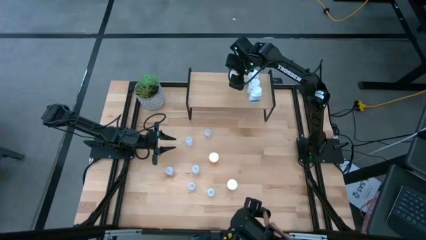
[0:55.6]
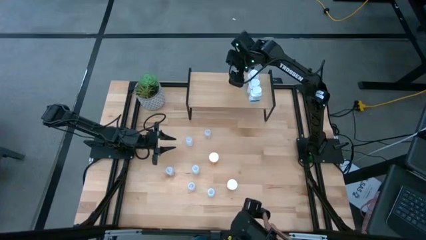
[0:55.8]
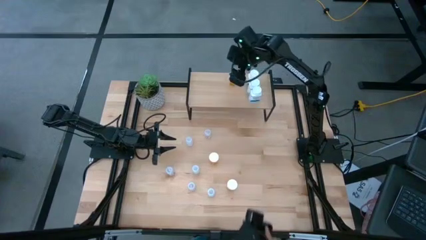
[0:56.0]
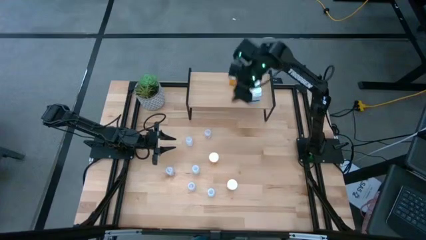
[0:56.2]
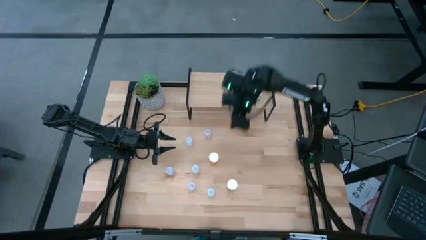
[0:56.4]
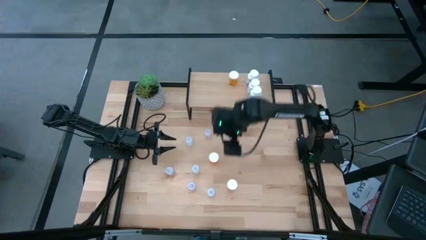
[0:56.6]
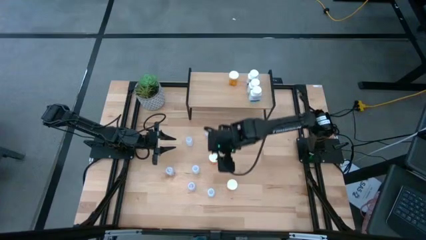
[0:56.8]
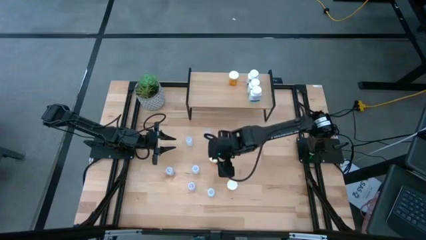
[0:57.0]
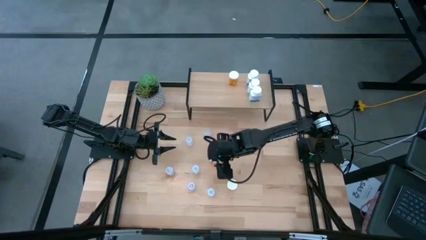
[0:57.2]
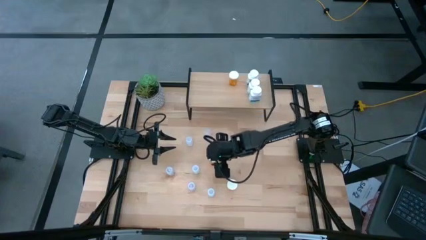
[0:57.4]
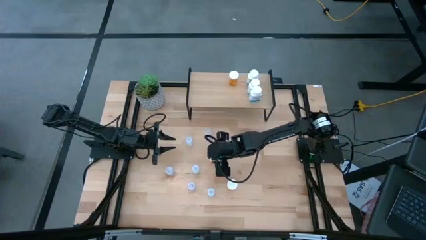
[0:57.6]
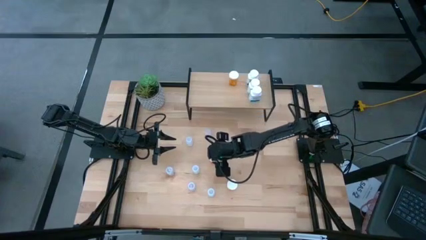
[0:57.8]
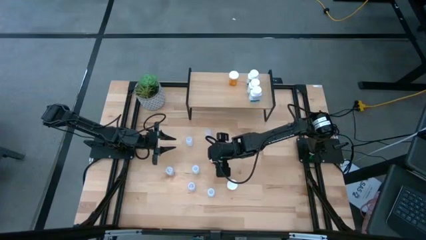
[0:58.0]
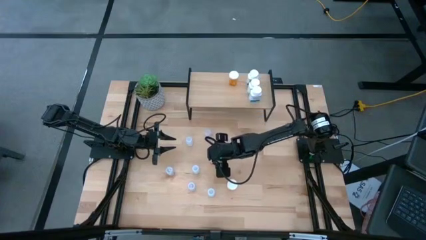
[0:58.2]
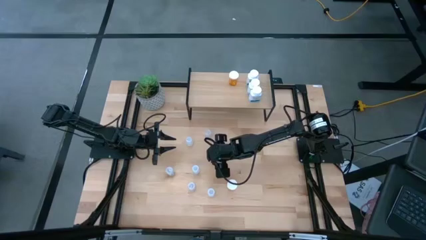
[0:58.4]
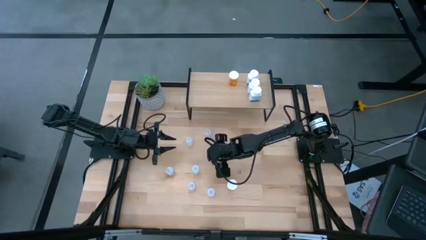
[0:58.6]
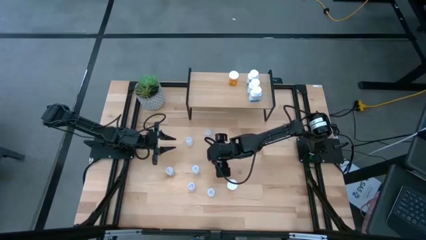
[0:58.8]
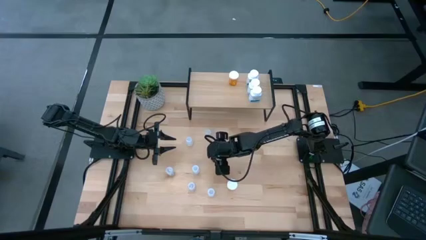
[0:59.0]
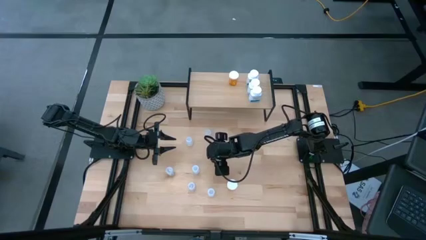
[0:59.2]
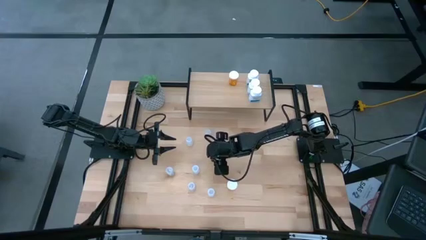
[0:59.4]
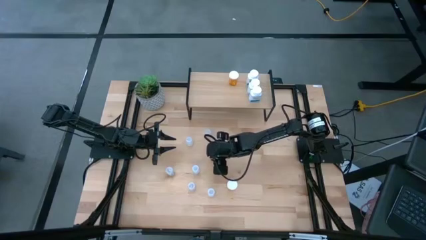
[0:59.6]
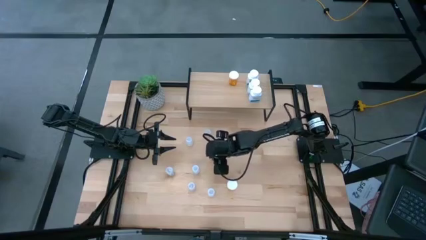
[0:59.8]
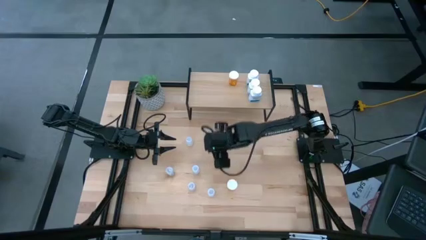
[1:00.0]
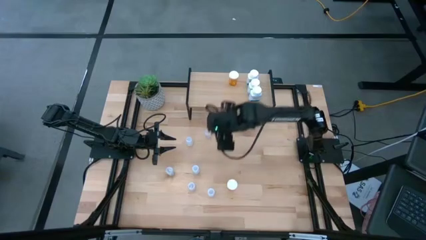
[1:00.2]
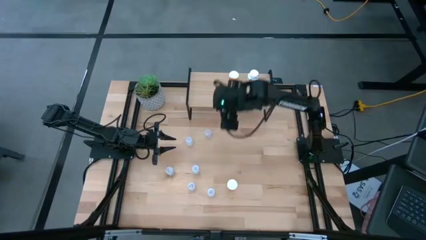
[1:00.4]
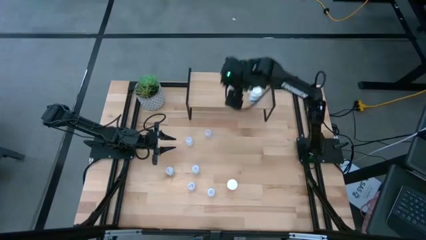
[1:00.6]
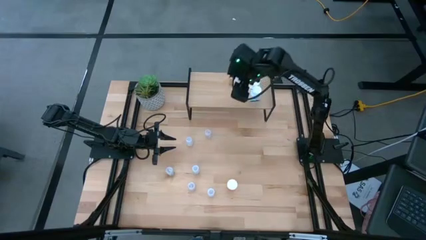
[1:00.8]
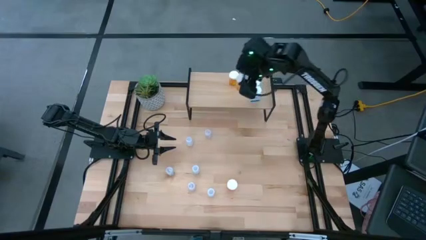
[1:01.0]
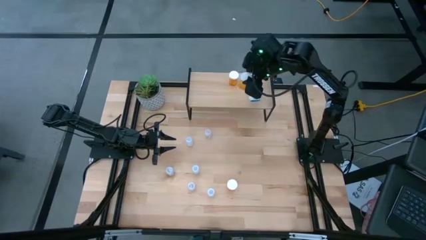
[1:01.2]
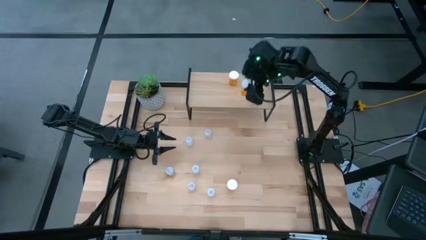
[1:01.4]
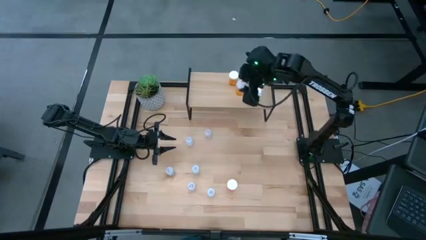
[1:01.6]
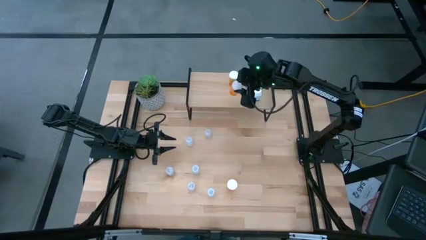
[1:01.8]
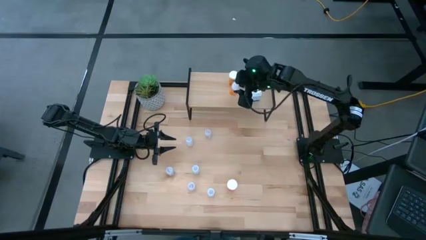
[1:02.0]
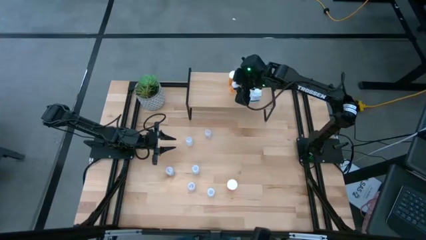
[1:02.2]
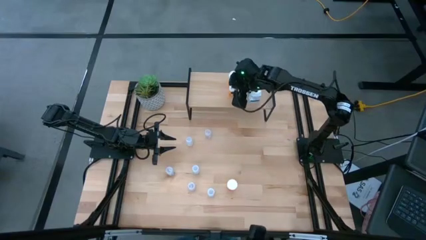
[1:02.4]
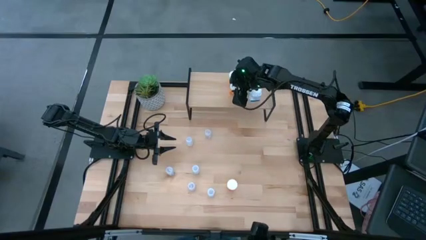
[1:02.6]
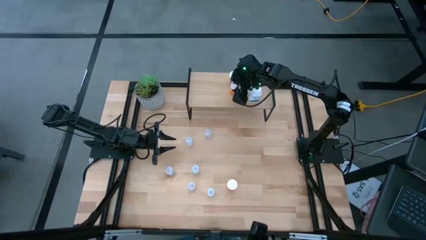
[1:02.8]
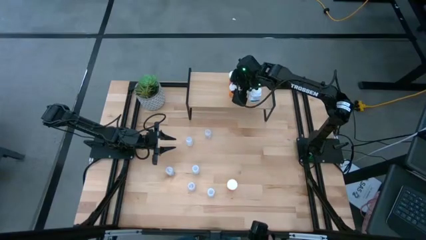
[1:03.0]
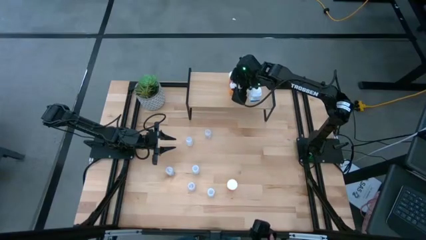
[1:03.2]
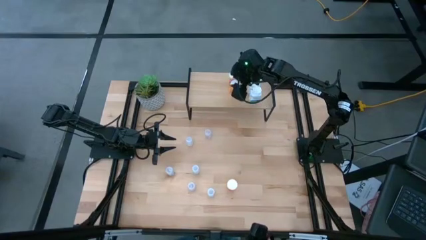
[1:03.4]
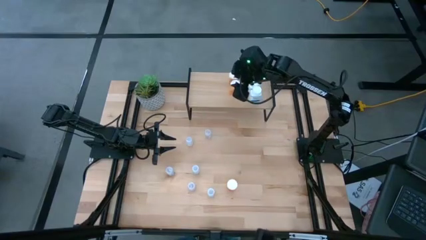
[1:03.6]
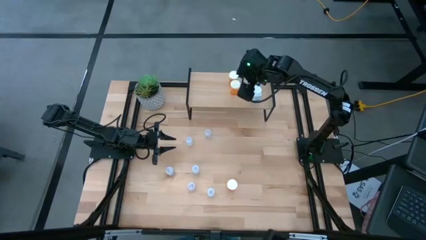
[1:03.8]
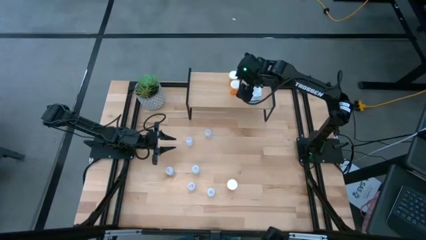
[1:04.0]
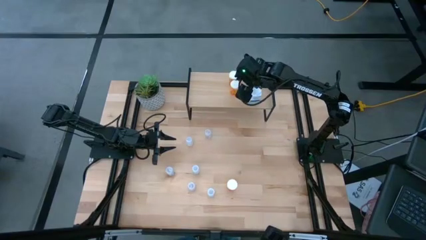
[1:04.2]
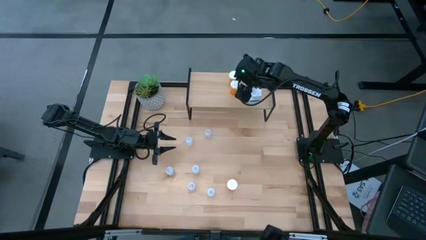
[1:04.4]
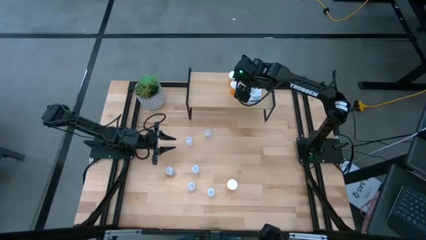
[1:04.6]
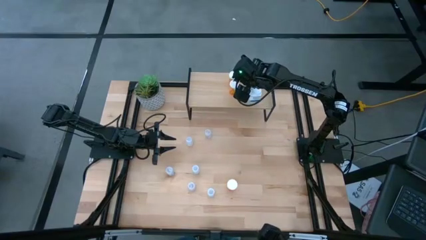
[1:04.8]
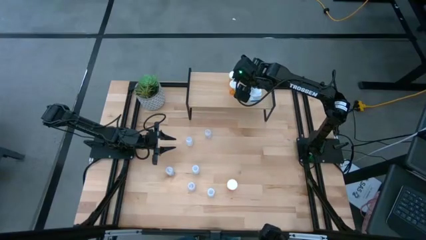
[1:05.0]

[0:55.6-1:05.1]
Task: Pick and place medicine bottles onto shelf by color
Put the top orange pill bottle on the shelf aligned with the other orange pill bottle

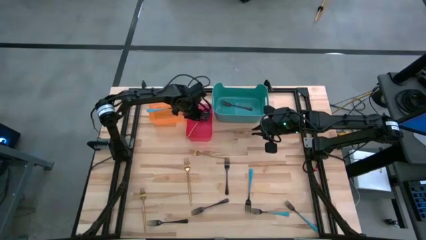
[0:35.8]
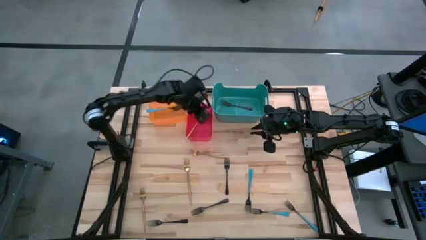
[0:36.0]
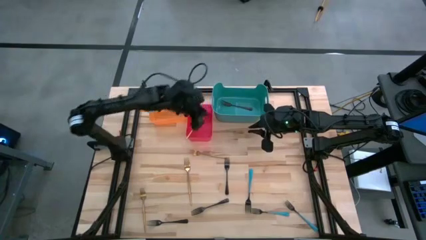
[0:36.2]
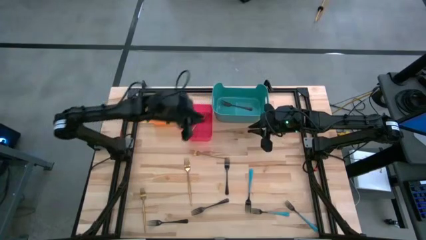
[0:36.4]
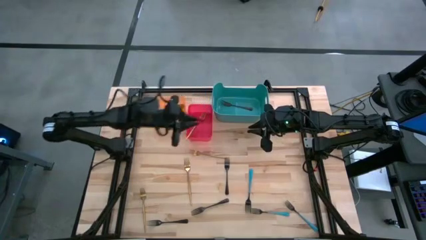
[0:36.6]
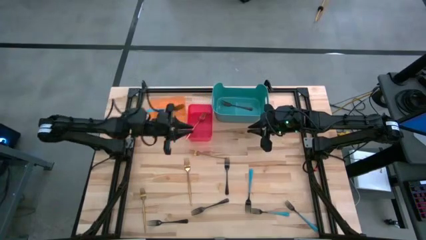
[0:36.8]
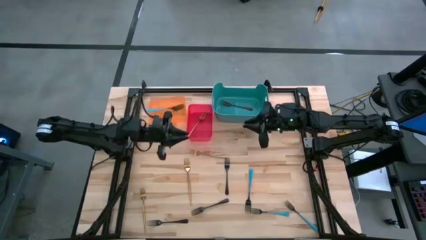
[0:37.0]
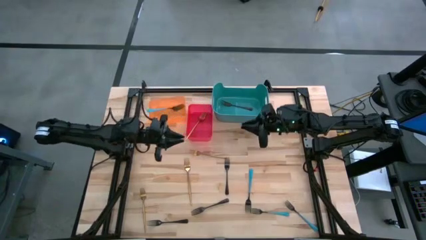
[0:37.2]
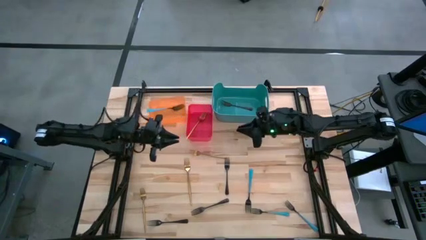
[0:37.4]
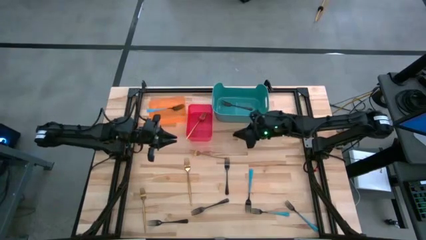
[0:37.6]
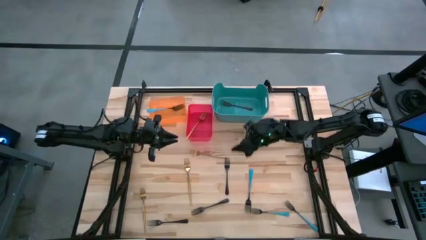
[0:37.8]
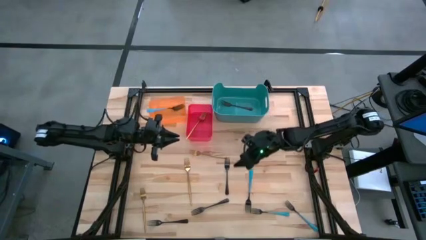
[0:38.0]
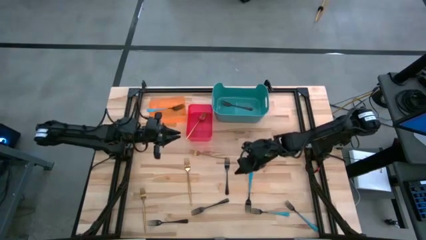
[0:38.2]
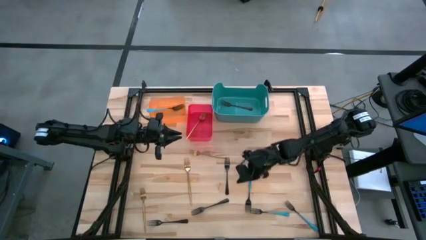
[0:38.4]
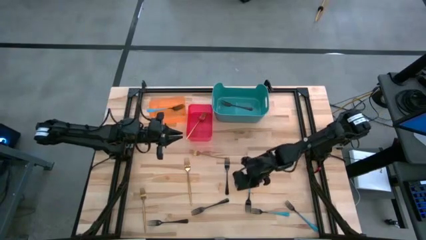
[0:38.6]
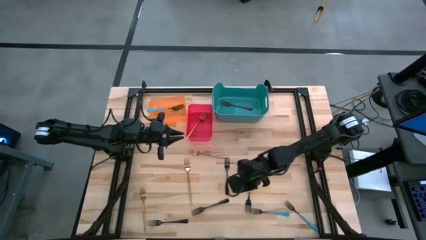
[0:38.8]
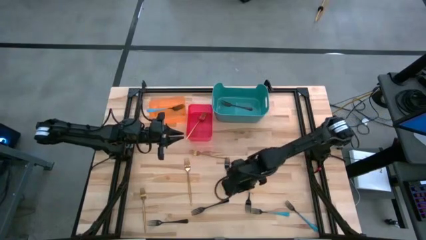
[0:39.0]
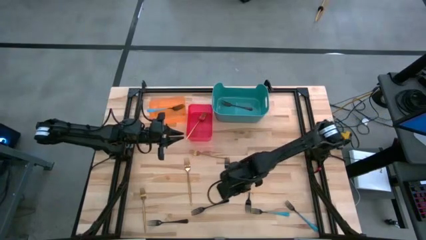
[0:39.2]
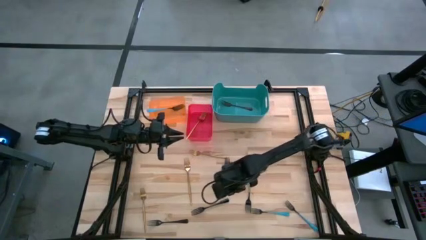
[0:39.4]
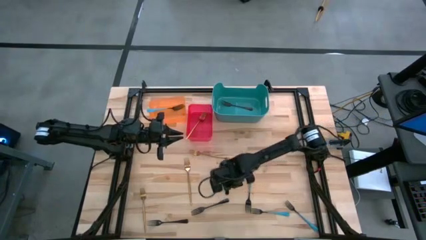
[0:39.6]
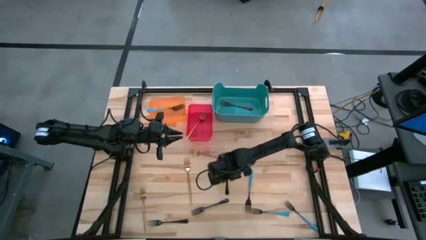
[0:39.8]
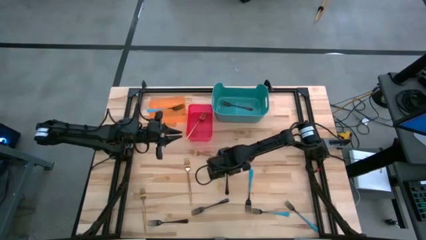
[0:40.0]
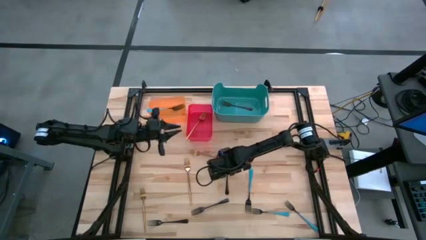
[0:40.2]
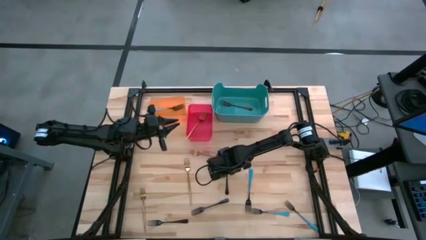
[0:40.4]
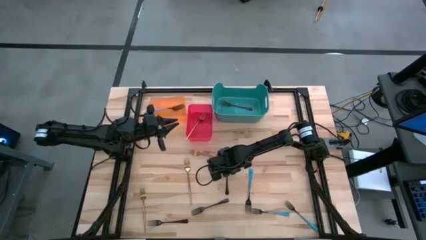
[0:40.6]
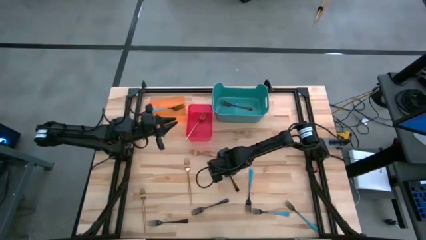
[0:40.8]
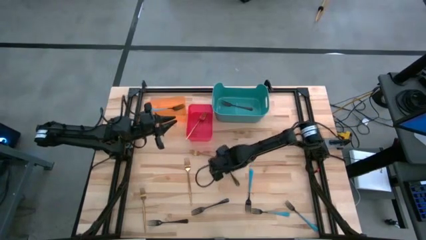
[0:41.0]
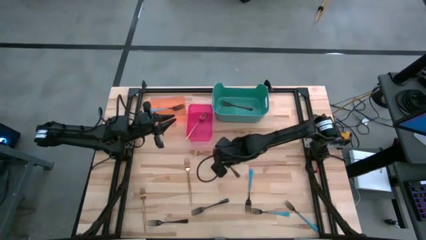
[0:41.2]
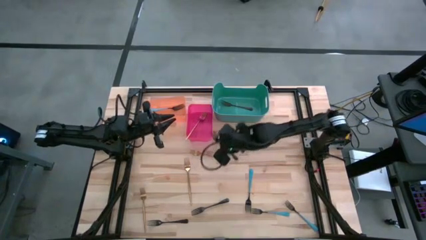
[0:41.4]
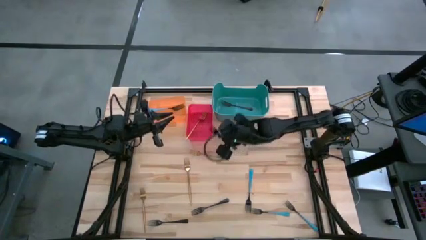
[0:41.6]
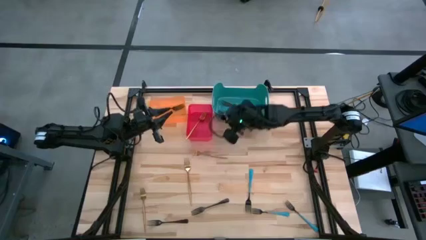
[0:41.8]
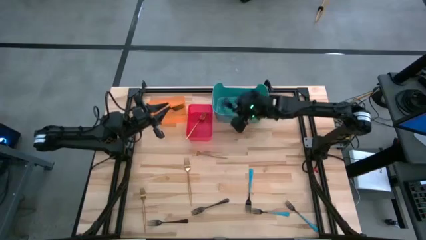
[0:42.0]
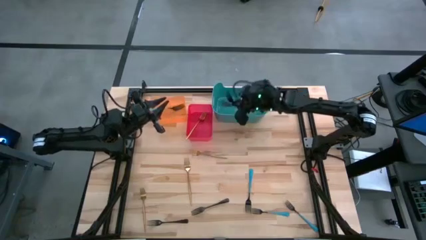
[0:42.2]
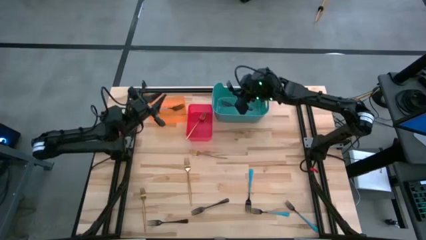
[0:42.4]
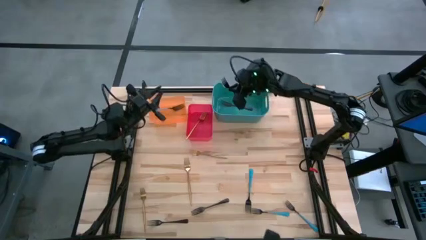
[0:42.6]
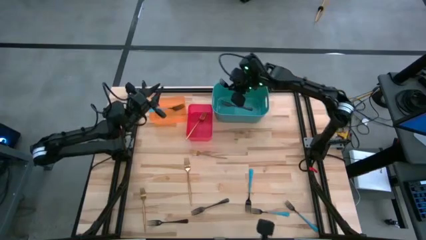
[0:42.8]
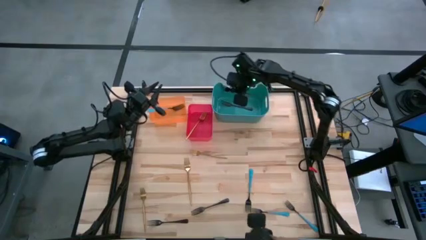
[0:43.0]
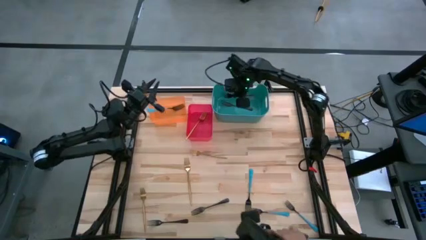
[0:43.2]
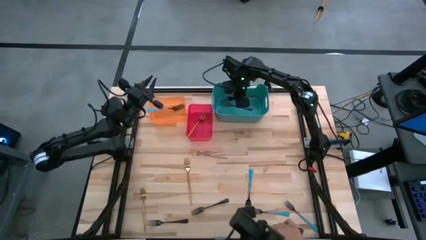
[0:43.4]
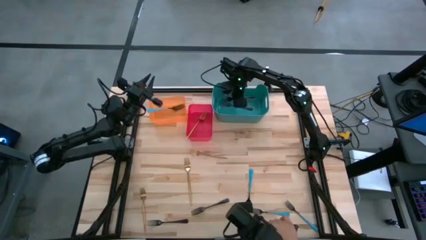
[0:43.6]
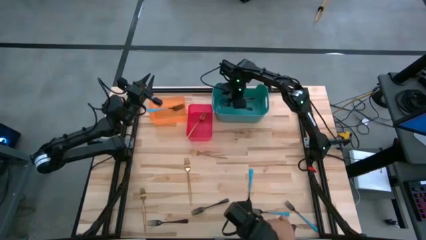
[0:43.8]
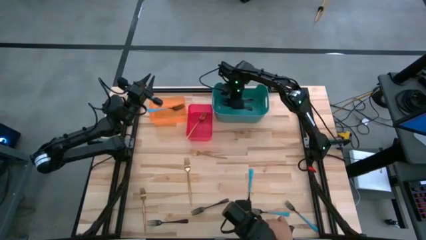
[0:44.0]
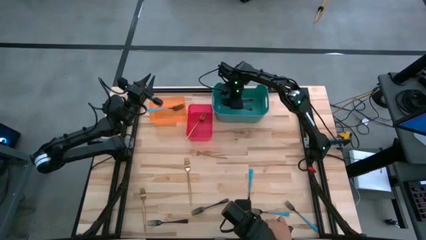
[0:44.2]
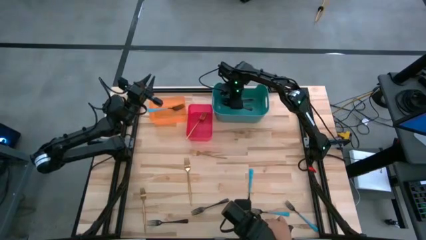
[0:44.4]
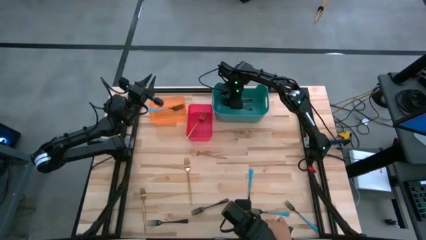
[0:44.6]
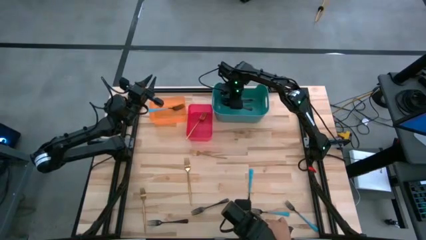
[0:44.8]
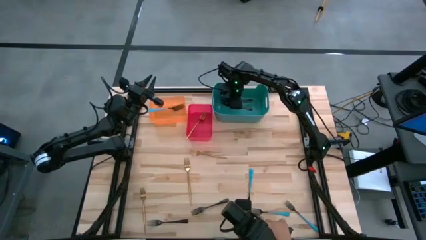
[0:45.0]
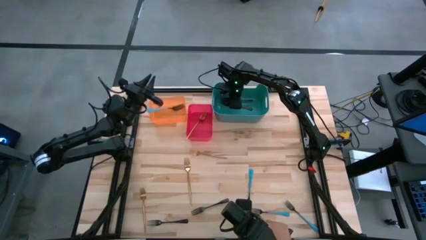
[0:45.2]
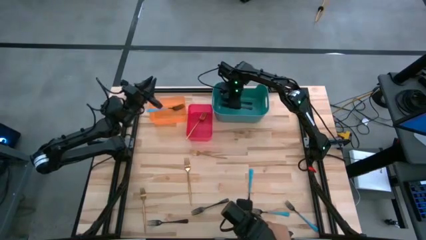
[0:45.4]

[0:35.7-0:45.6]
Task: Sort silverware by color (type)
Put the black fork into the green bin
